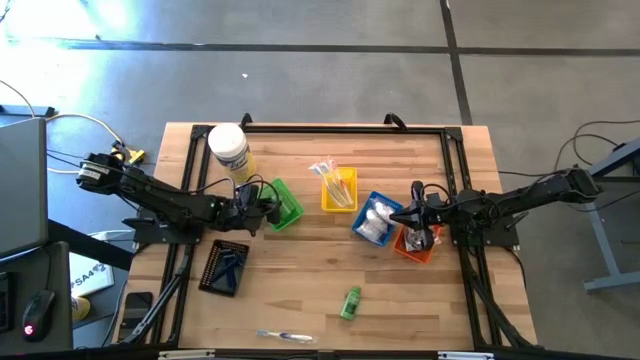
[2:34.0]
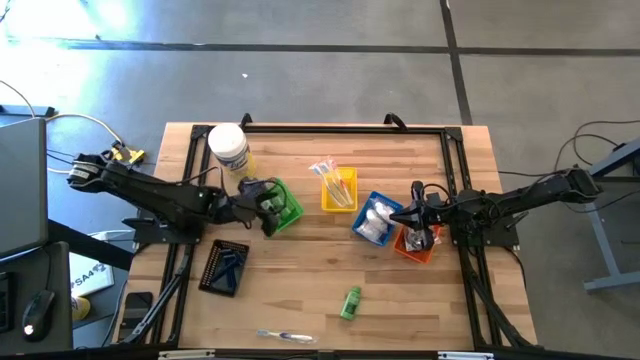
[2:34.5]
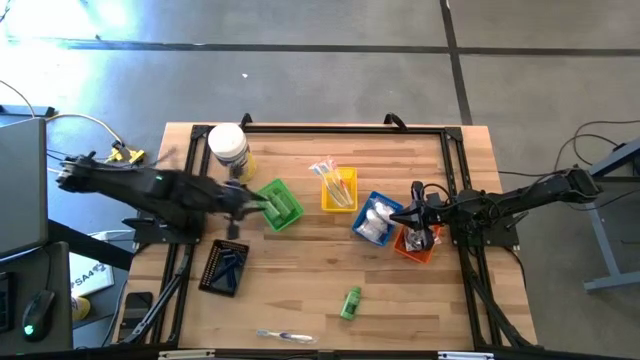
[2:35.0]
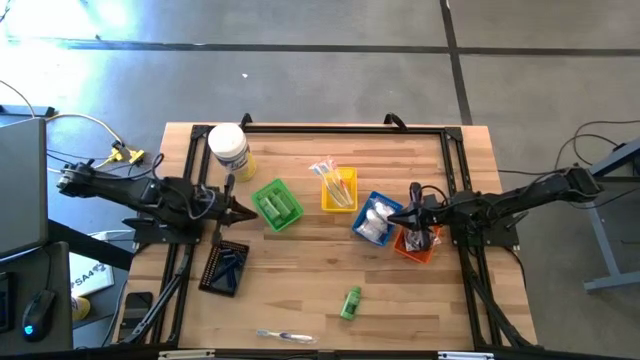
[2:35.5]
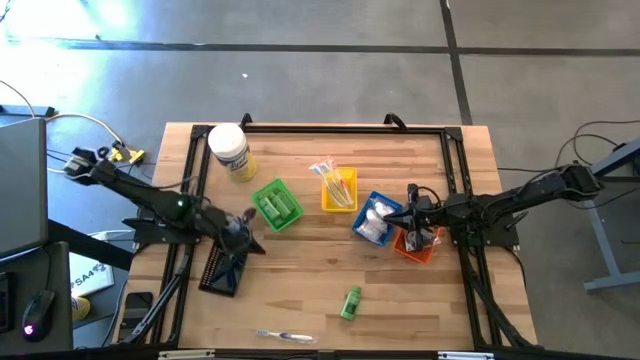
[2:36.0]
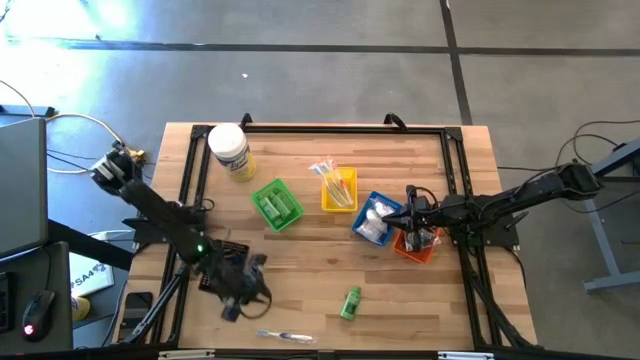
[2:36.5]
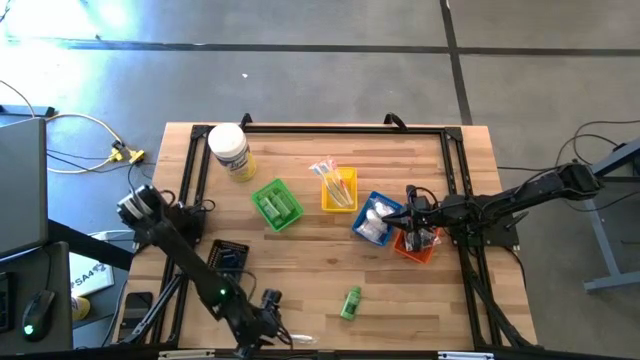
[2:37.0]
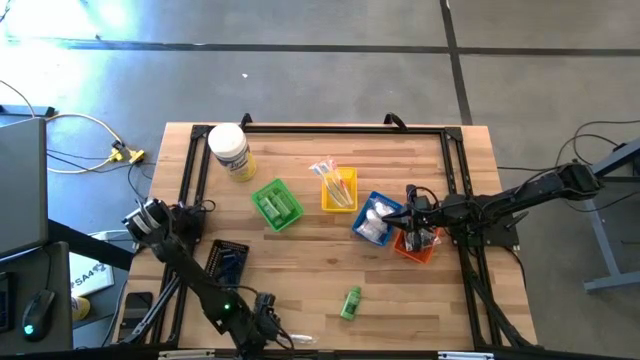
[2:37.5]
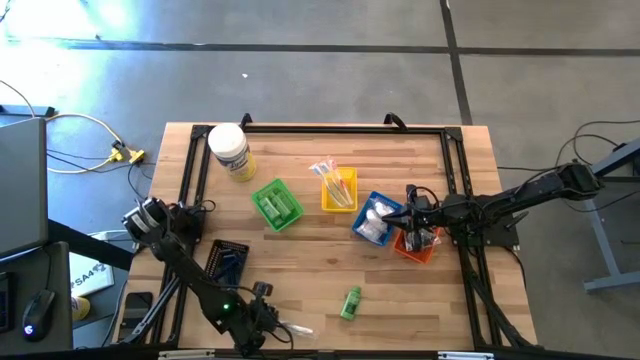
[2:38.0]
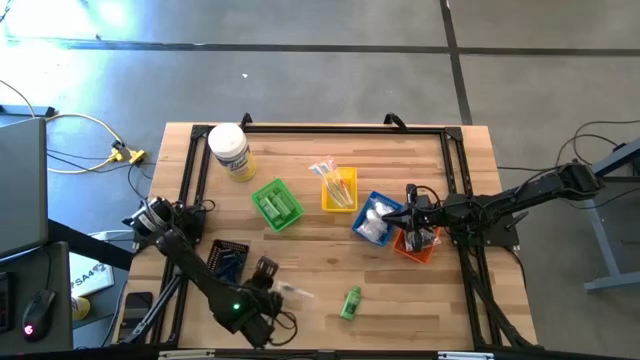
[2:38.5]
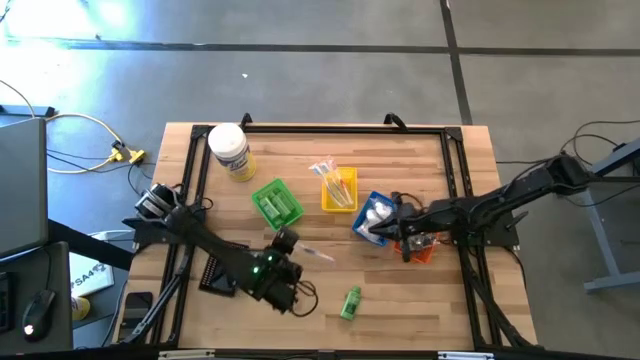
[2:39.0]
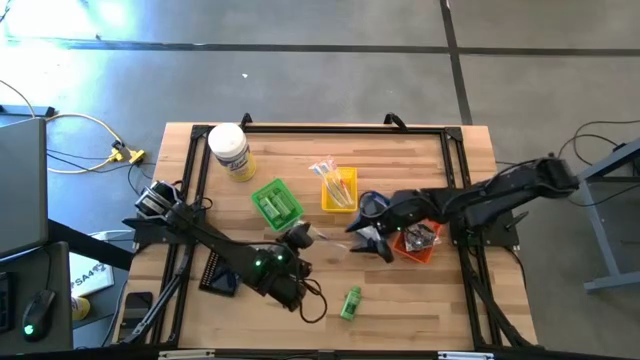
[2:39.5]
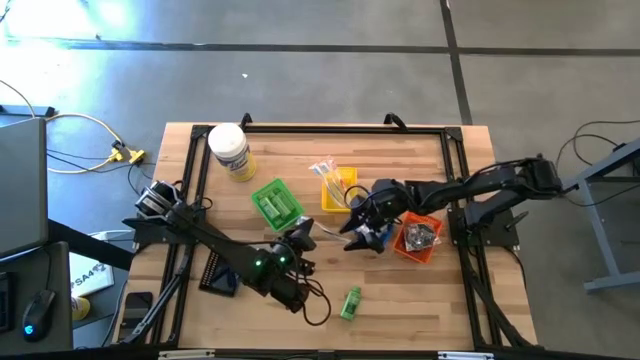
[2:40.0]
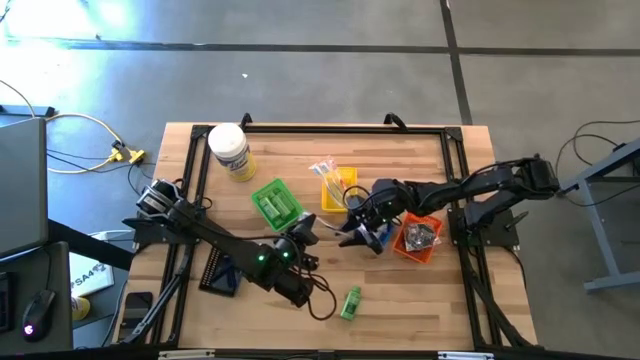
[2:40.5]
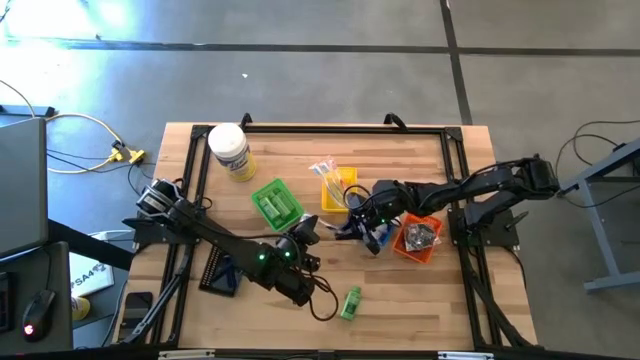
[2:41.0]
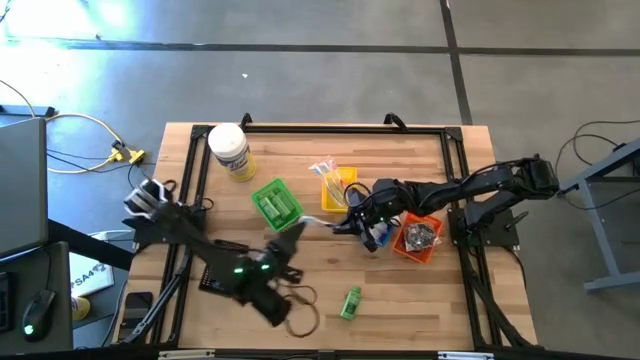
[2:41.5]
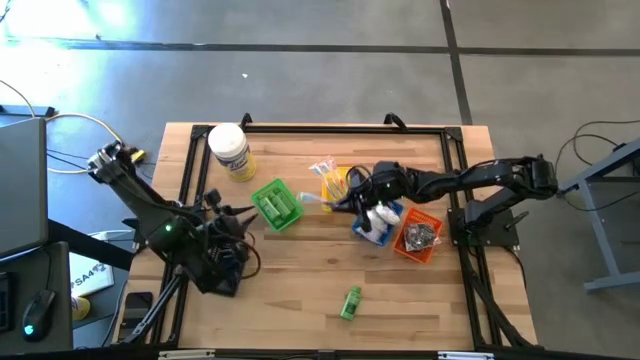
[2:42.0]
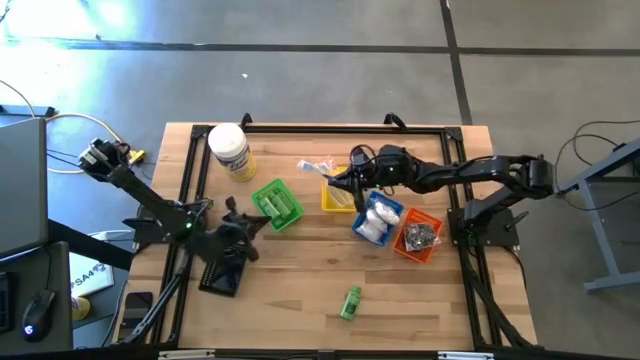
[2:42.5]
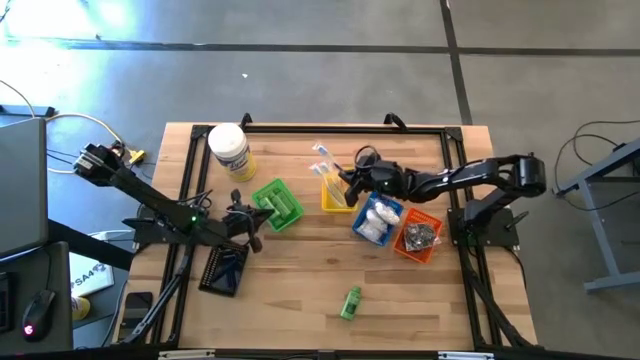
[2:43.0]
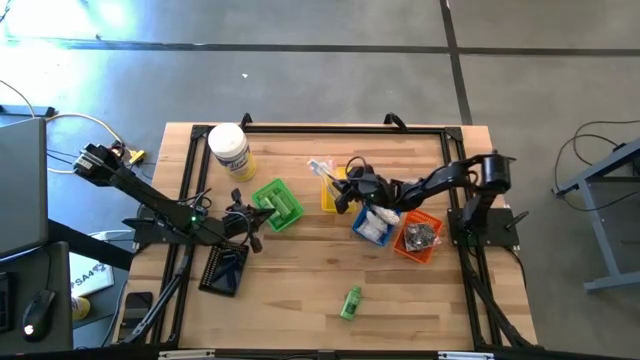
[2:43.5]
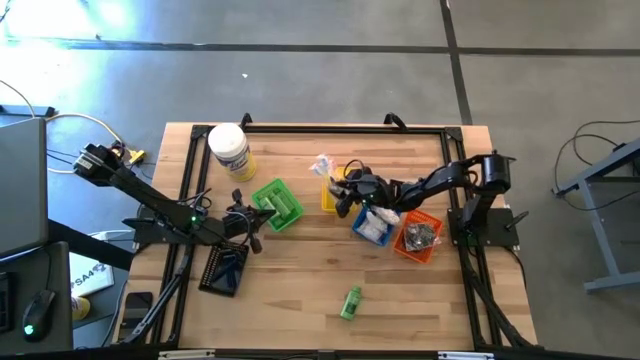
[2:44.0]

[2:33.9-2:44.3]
Task: Pick & Place Travel size toiletries
Put the blue toothbrush into the yellow bin

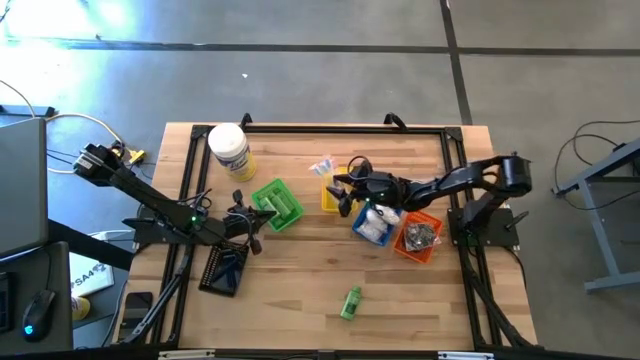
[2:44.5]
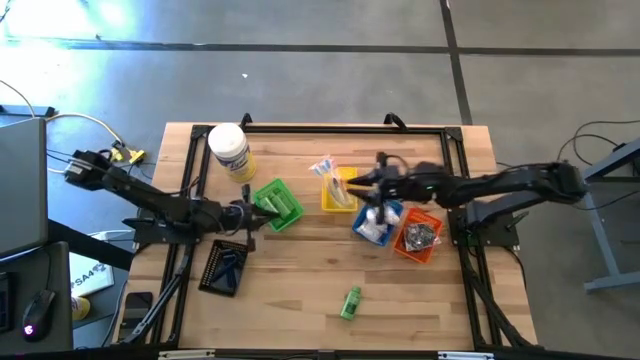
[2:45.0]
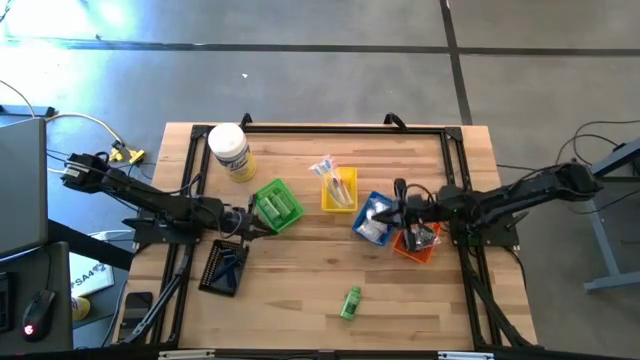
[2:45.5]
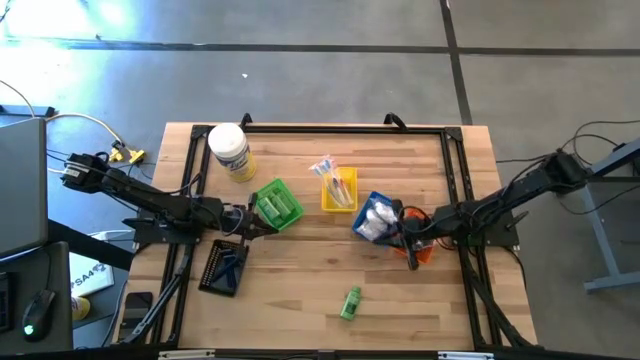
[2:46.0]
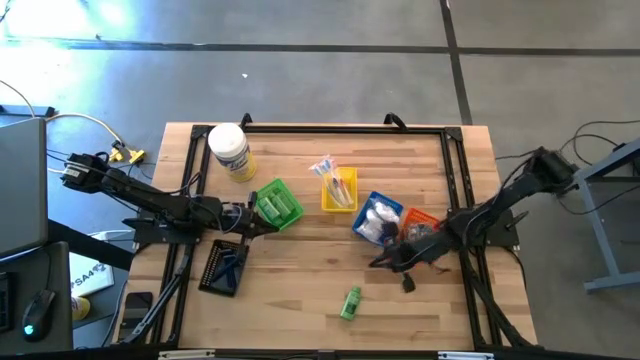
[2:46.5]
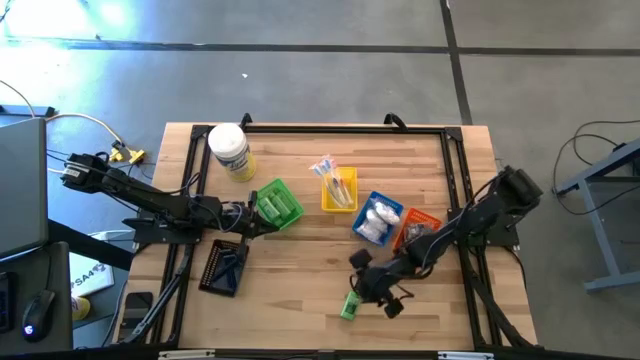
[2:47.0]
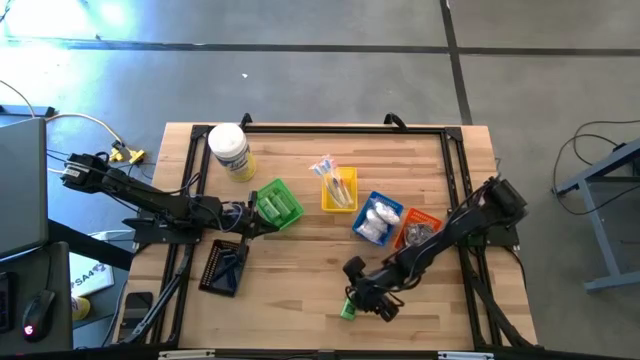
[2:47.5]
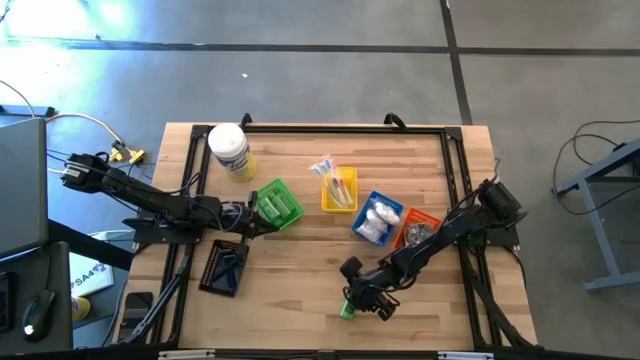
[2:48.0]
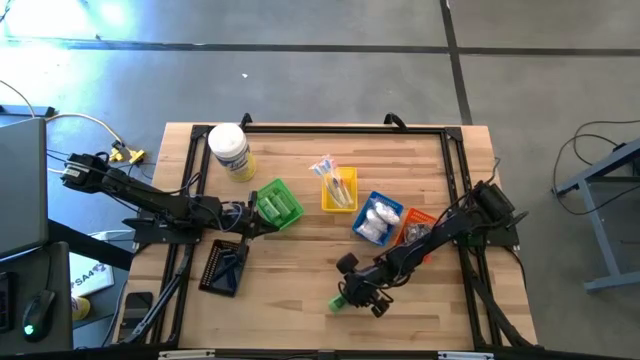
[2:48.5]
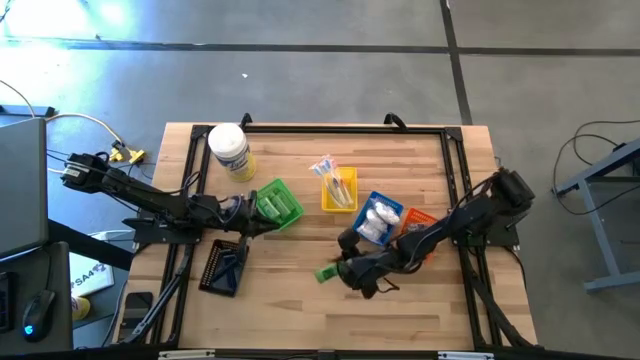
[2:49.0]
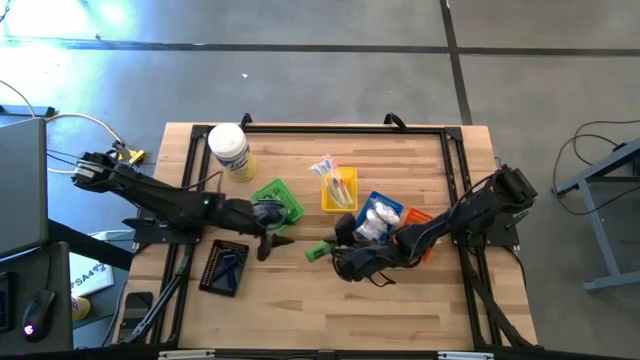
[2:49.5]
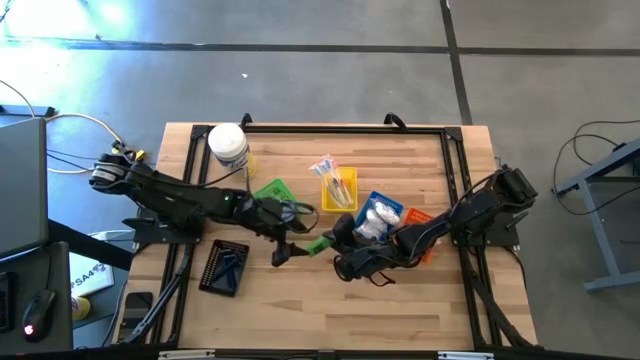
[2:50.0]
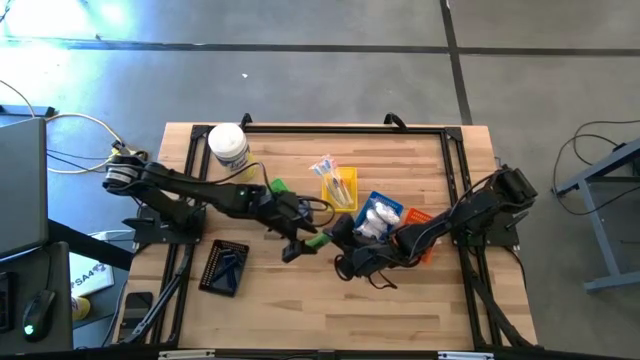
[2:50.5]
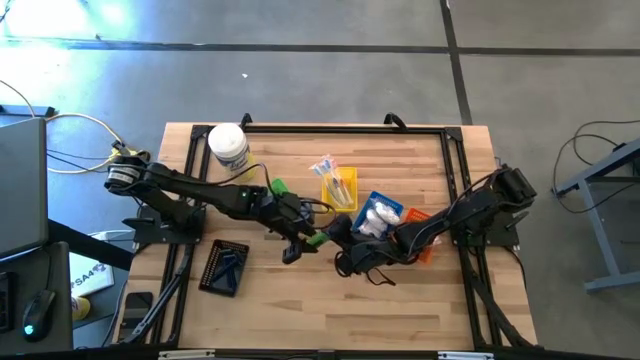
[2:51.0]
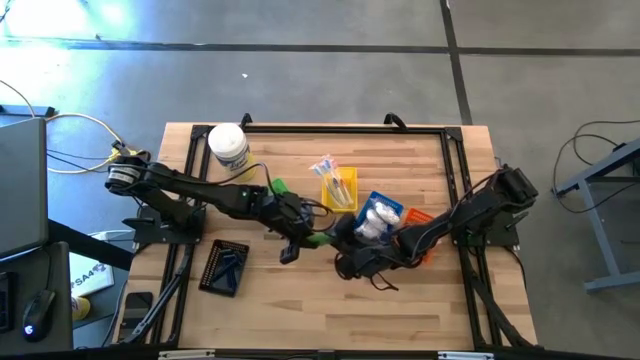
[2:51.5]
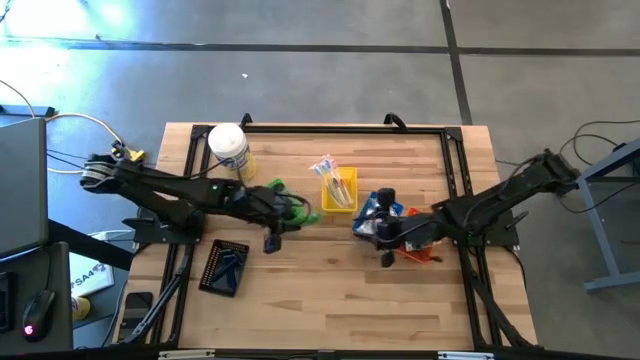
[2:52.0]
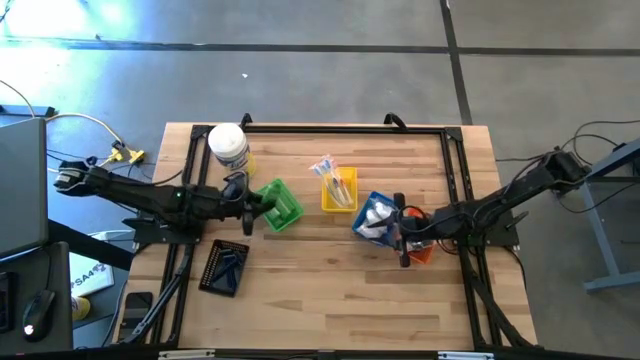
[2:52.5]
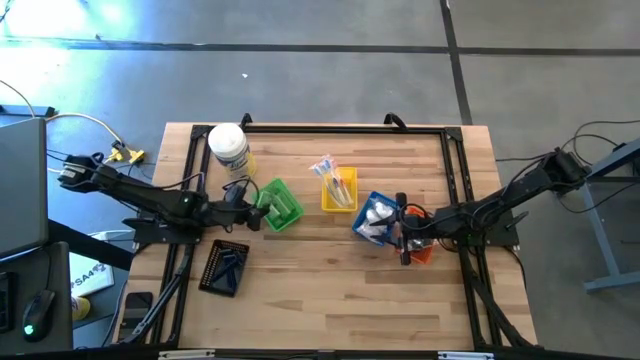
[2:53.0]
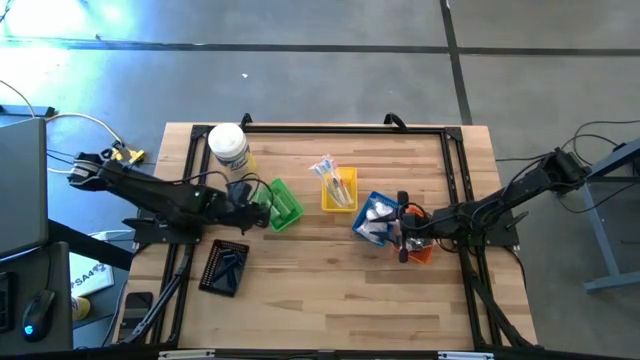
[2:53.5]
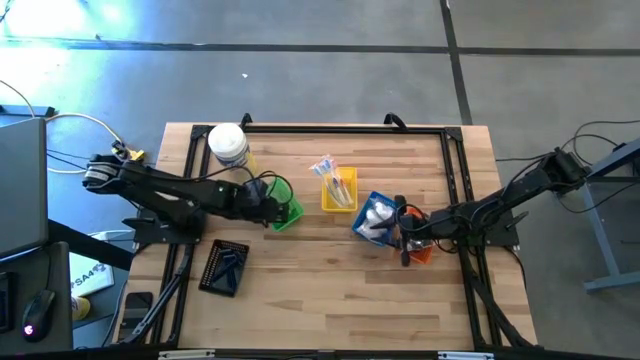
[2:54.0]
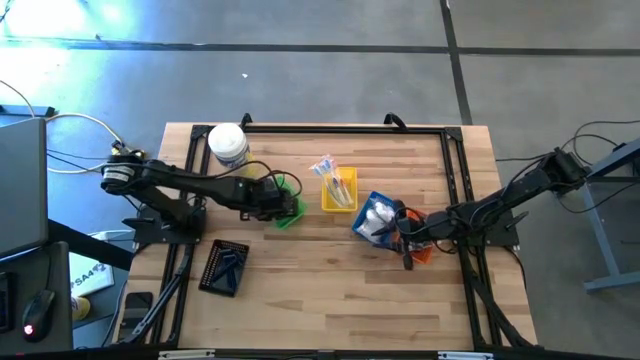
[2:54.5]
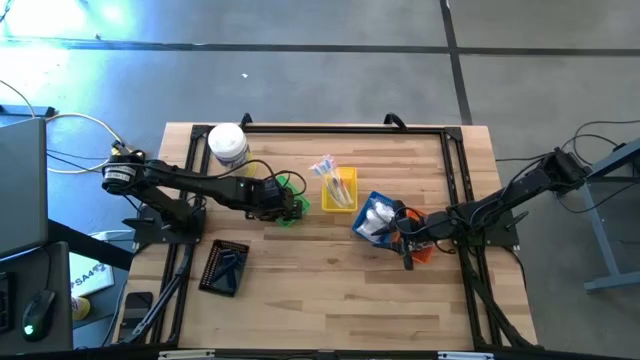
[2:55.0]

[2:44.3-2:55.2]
Put the shampoo into the green bin
